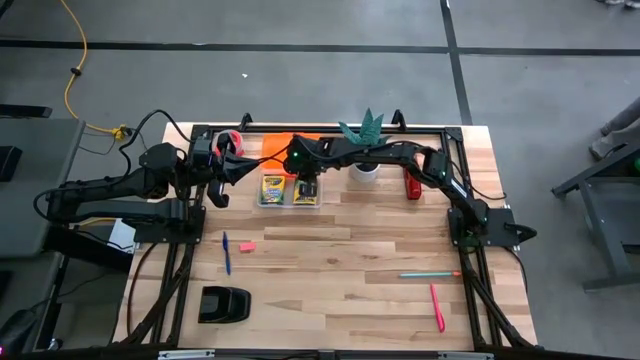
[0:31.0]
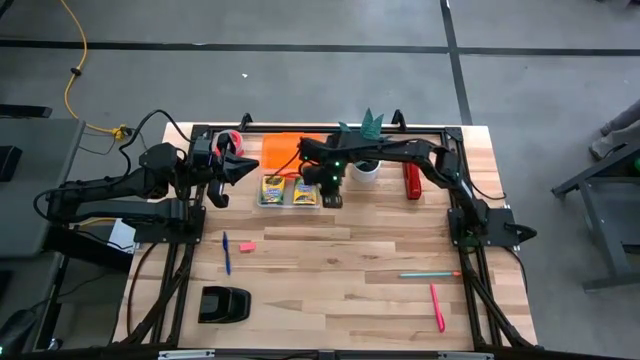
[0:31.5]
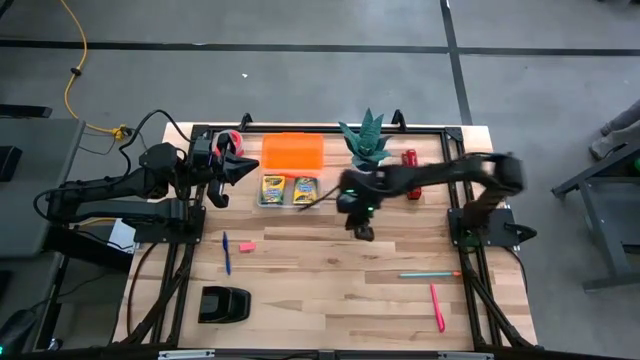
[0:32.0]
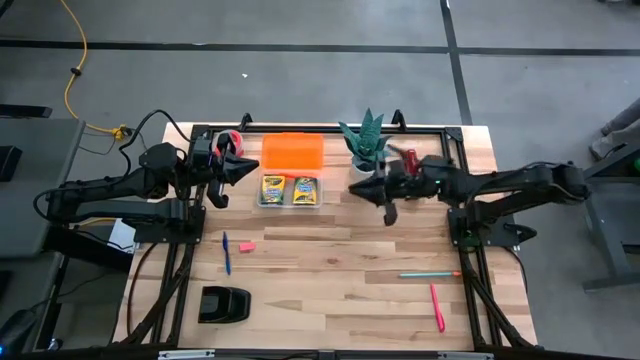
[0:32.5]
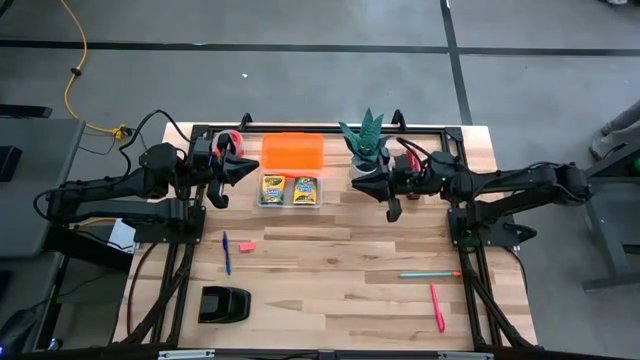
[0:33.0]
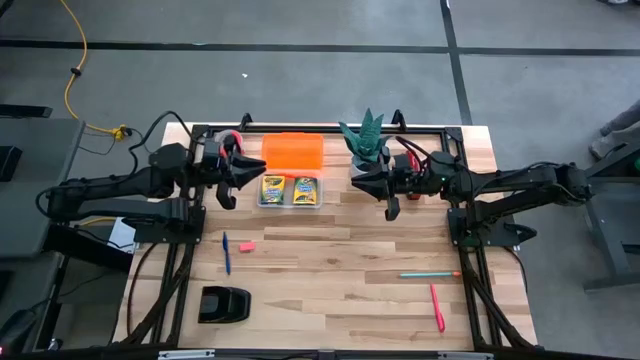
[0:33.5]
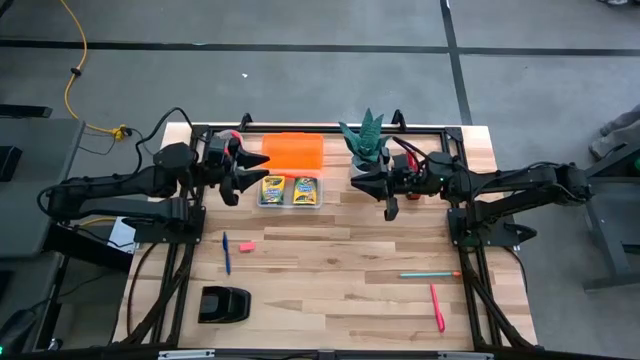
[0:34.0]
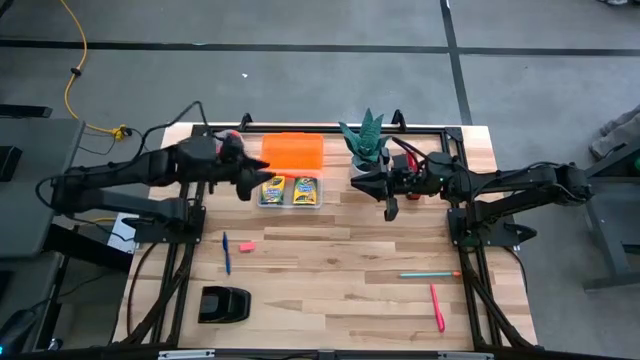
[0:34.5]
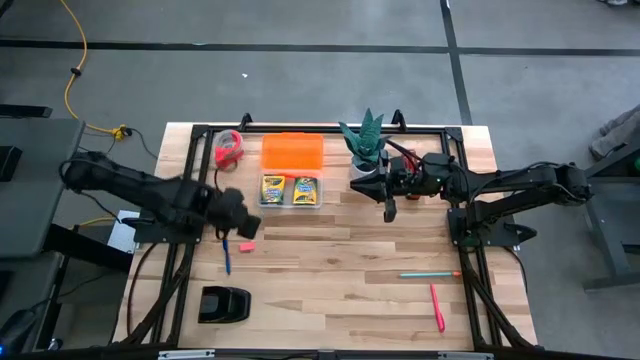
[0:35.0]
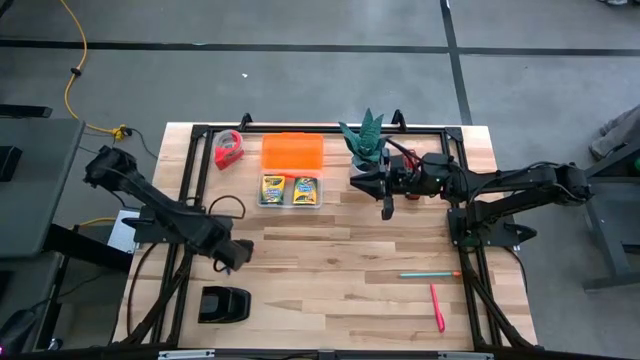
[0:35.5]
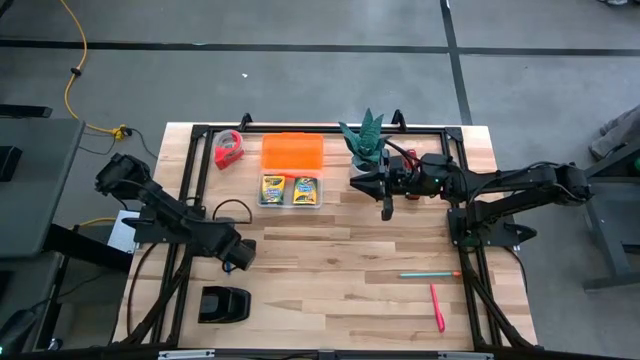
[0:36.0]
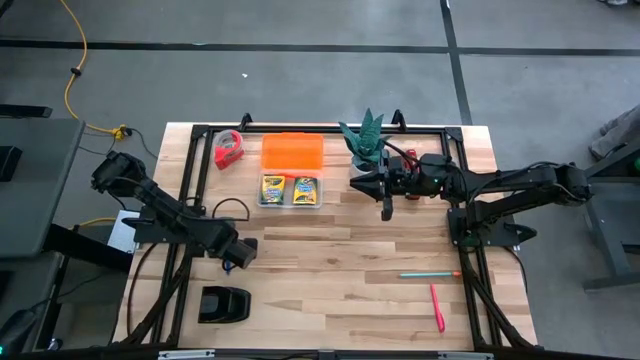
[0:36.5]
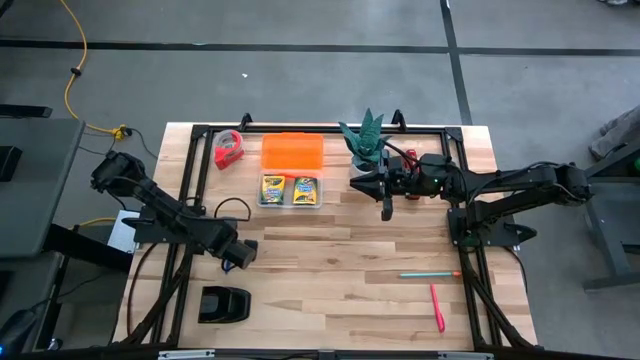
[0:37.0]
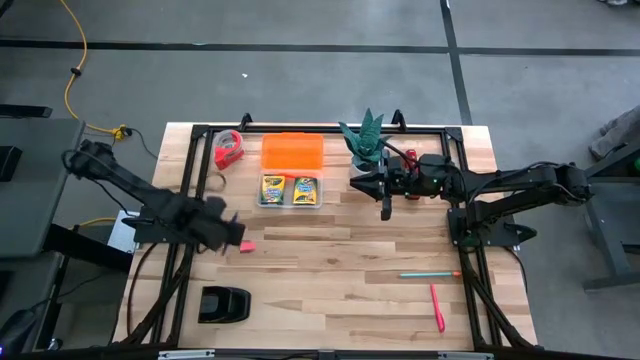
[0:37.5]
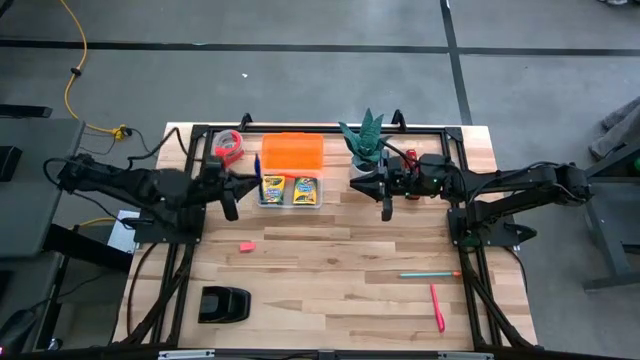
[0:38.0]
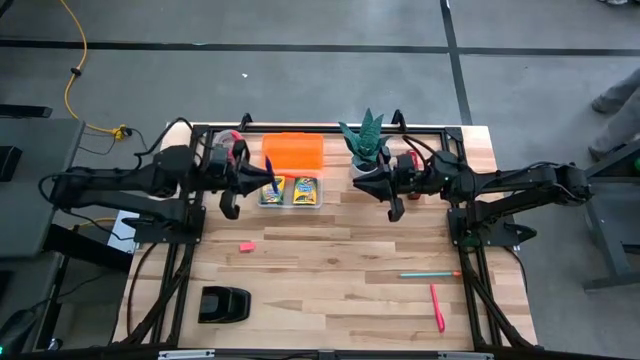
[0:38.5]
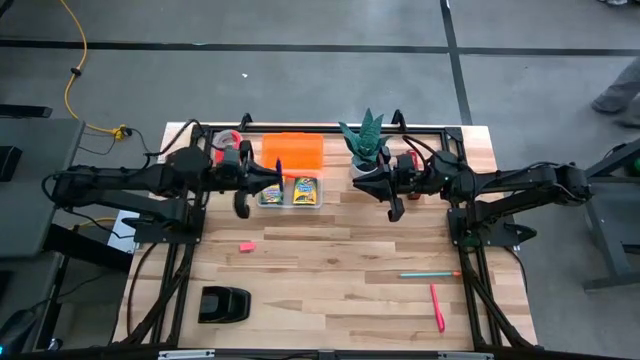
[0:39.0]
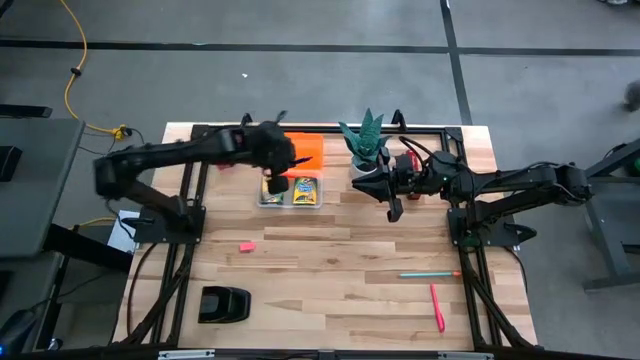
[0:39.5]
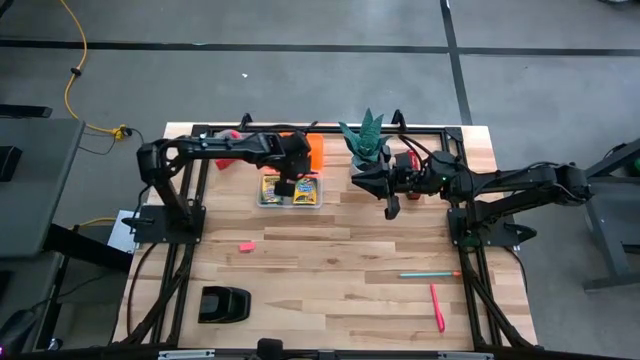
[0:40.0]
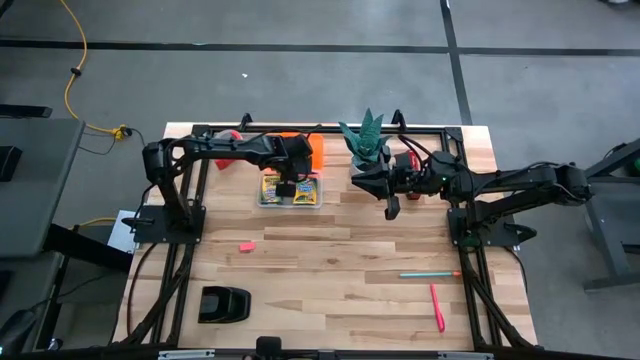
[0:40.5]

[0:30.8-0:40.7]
Task: Pack school essentials
Put the blue pen into the orange supply box

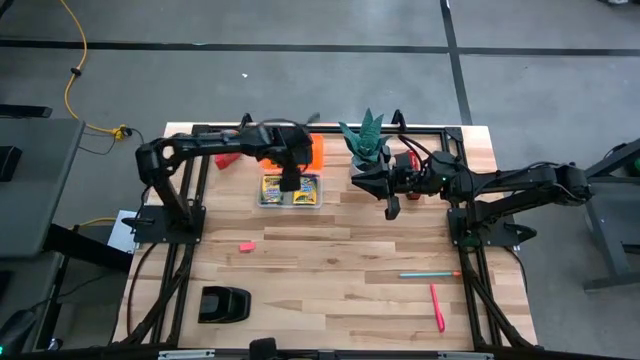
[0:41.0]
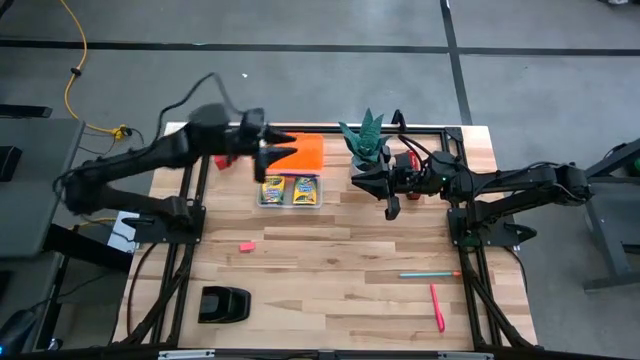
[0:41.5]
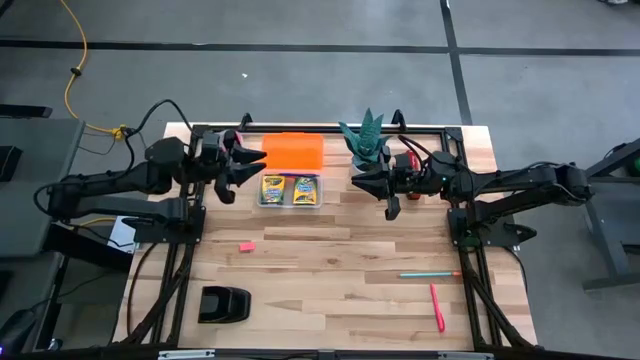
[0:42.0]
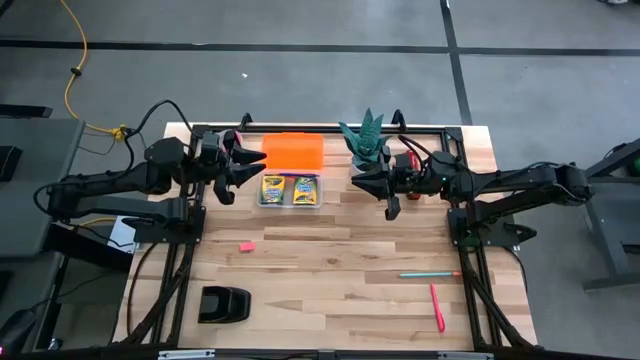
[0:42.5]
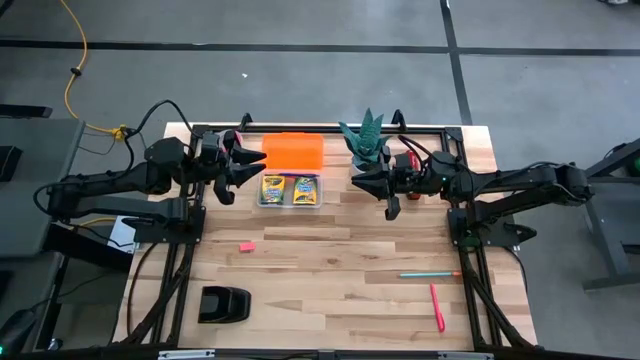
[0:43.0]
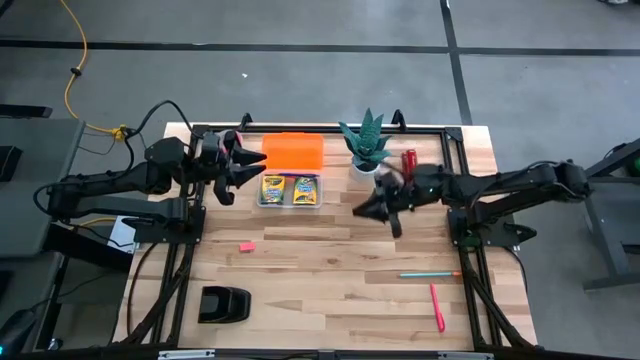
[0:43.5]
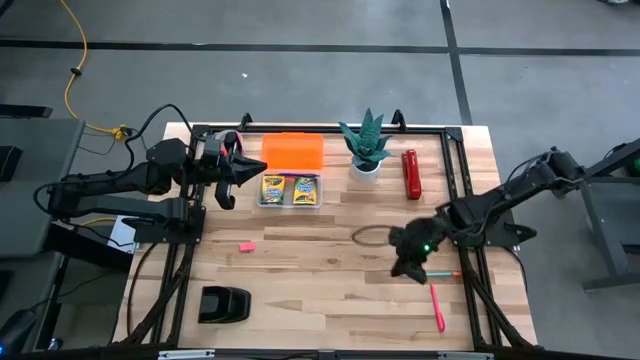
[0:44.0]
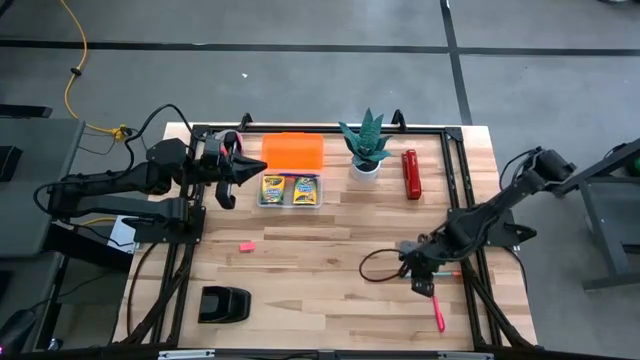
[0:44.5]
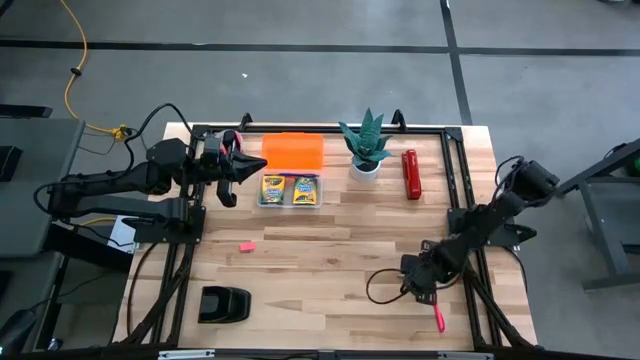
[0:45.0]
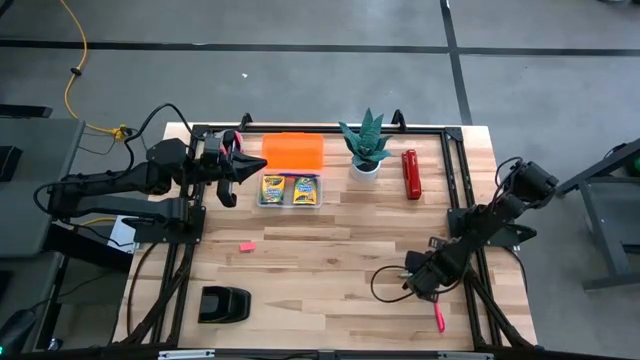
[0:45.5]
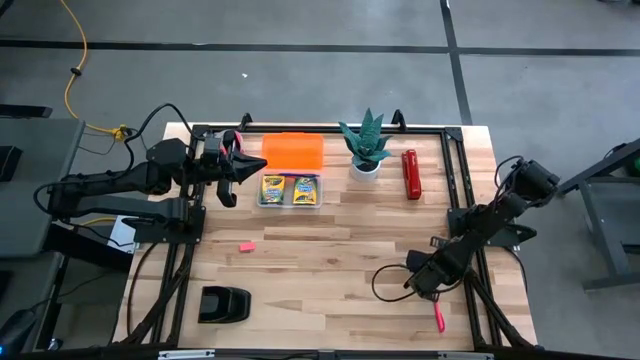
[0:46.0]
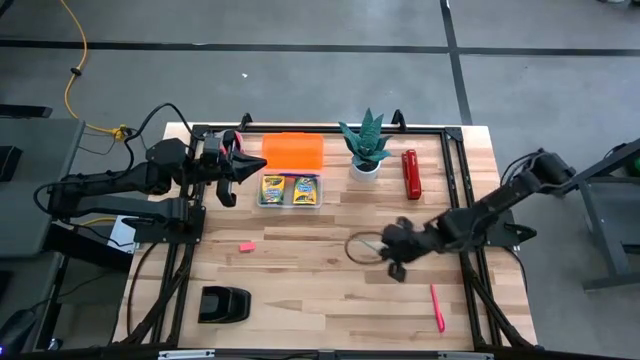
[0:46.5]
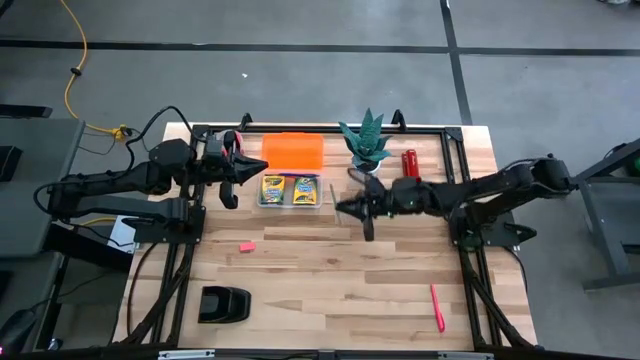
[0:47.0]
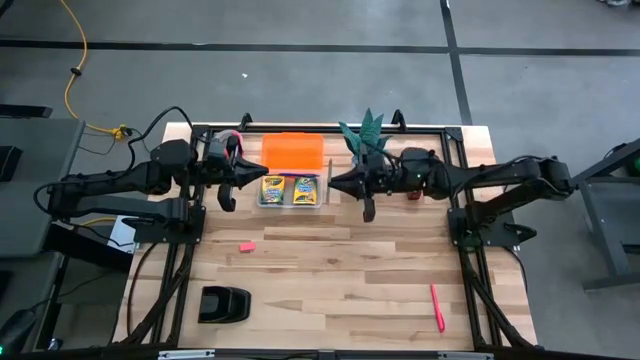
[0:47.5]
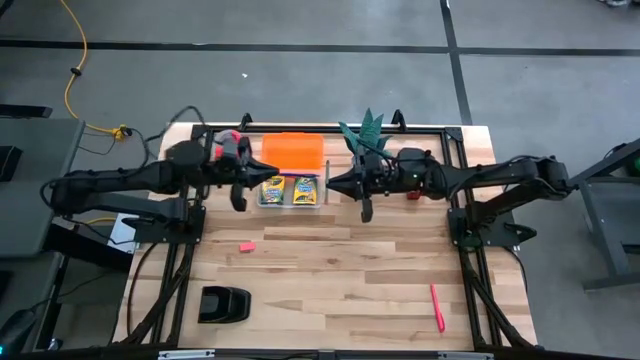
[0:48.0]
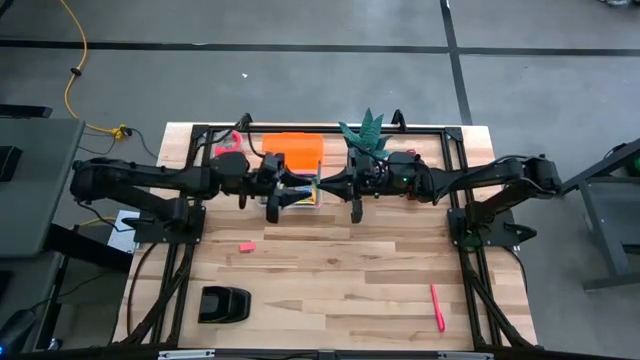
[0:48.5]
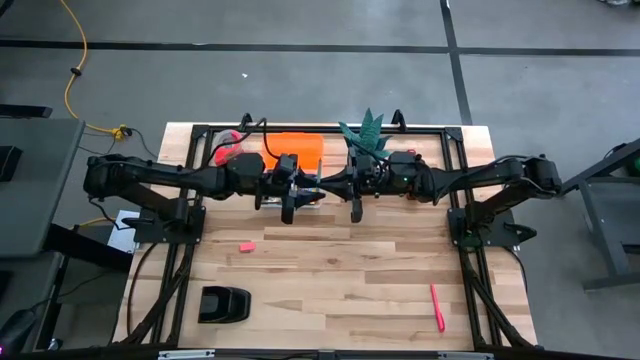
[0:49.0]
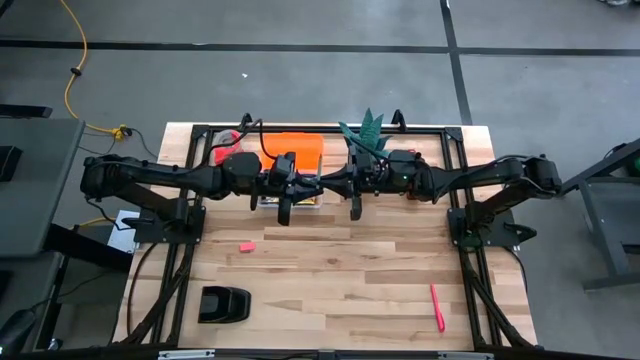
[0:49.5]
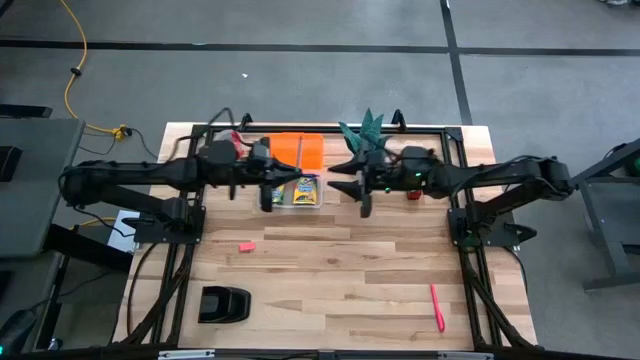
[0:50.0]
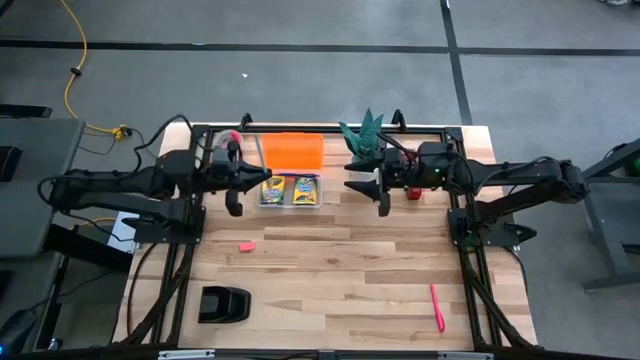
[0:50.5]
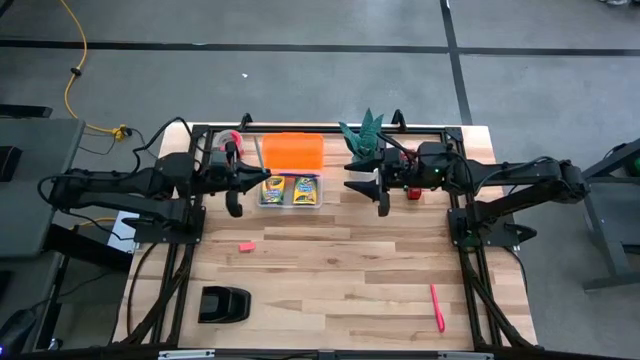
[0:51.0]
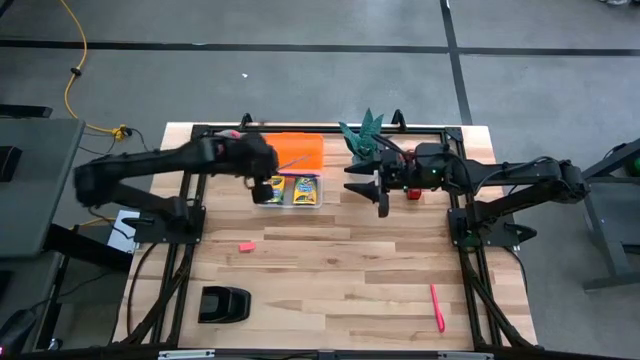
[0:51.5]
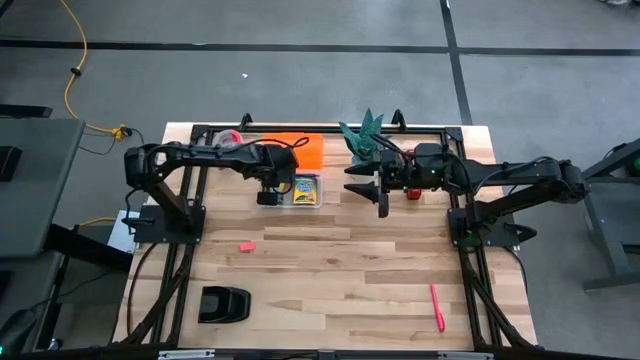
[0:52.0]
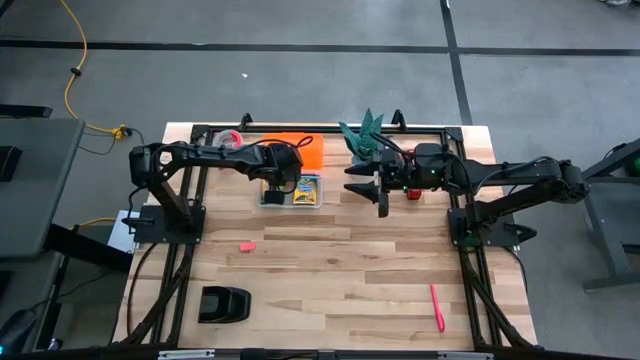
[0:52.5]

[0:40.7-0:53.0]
Put the light blue pencil into the orange supply box
